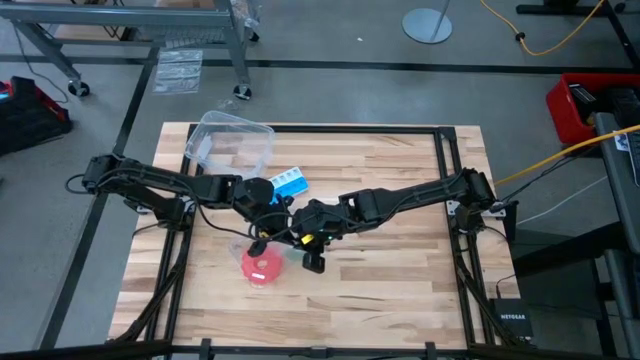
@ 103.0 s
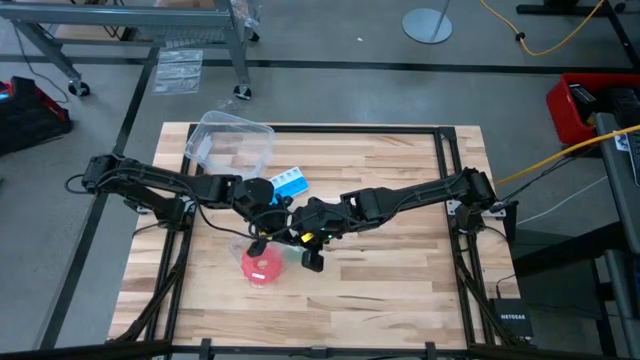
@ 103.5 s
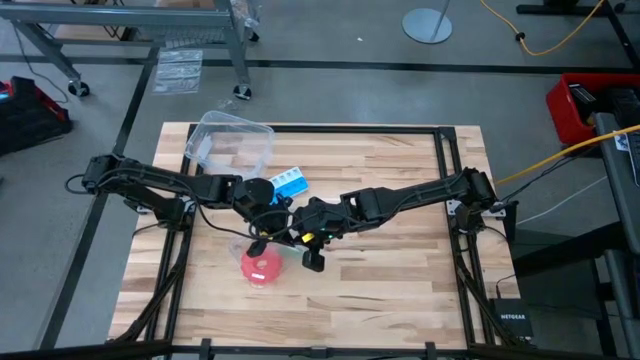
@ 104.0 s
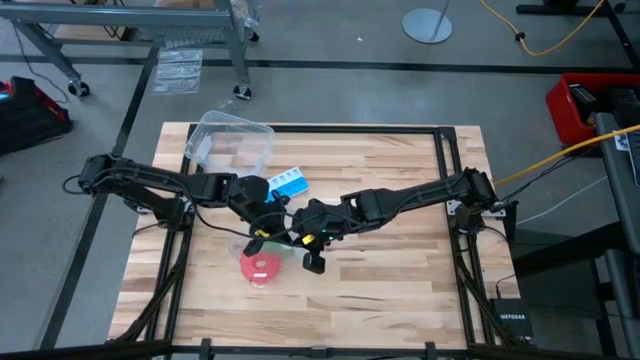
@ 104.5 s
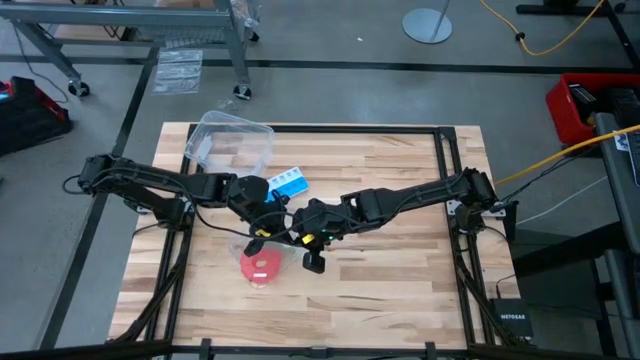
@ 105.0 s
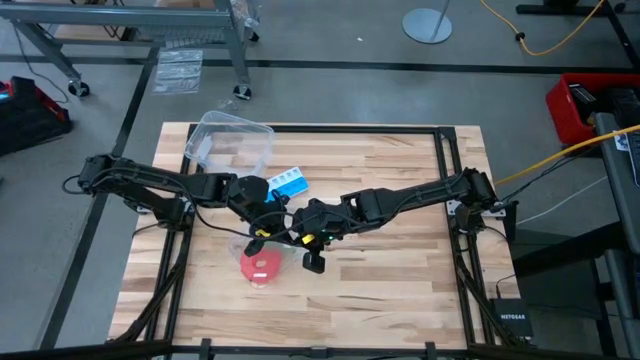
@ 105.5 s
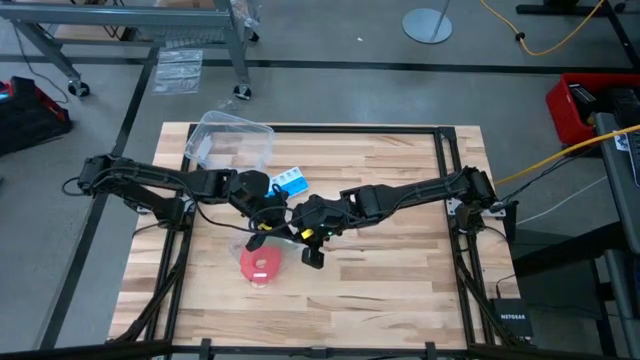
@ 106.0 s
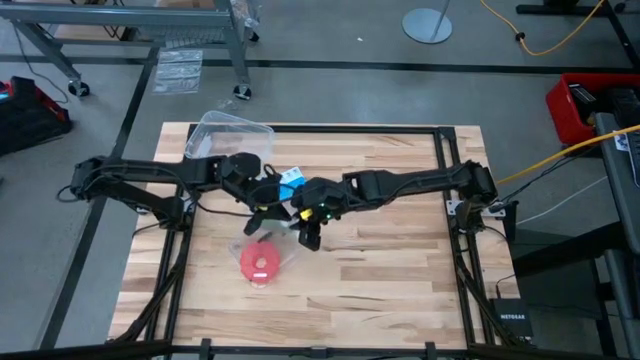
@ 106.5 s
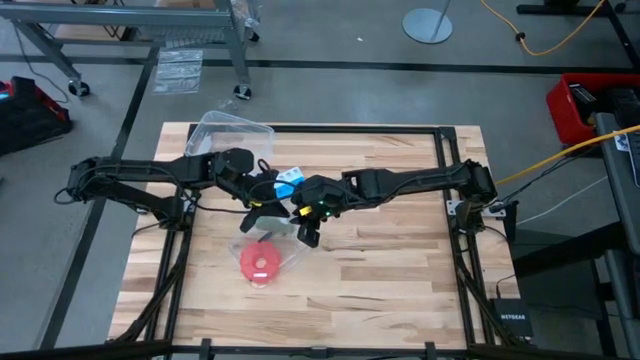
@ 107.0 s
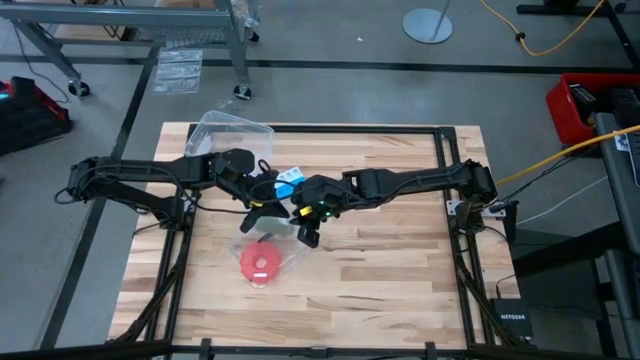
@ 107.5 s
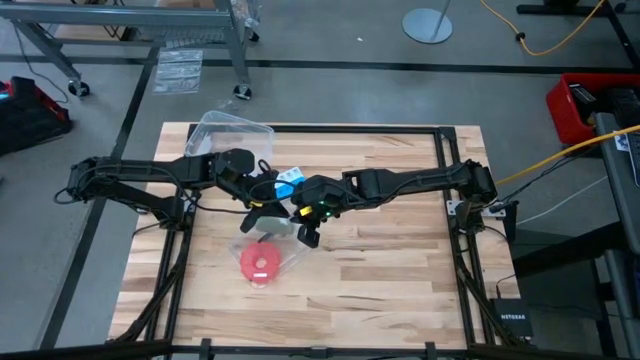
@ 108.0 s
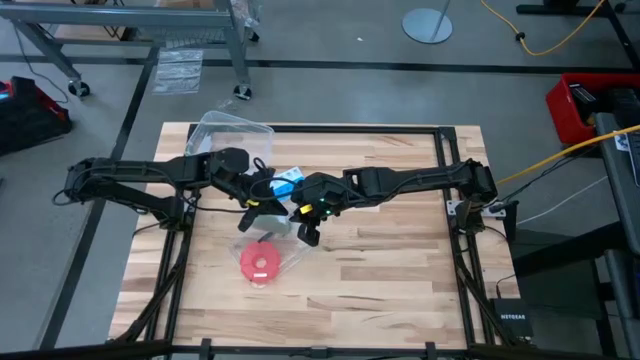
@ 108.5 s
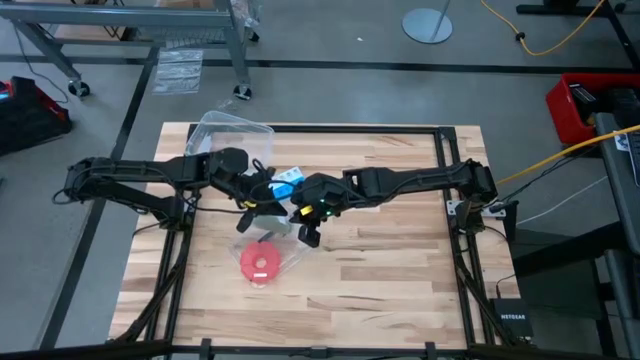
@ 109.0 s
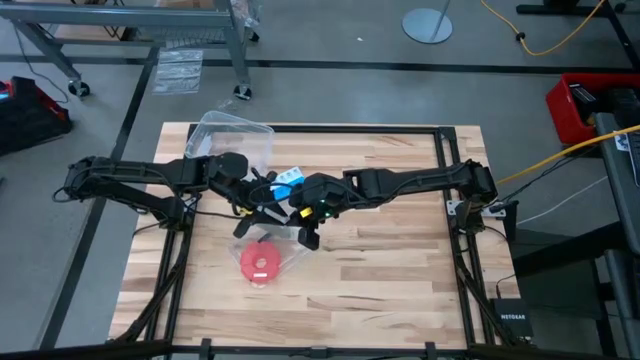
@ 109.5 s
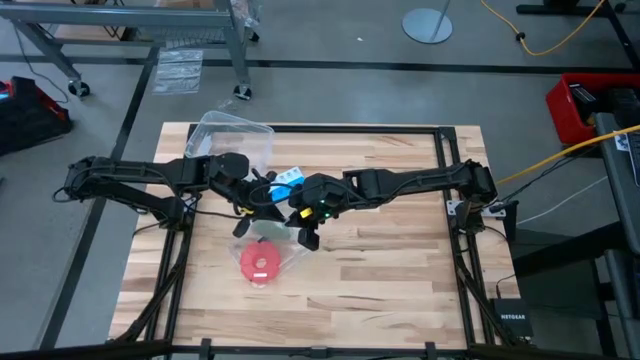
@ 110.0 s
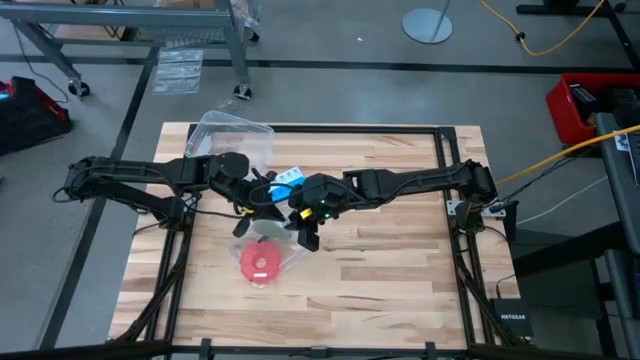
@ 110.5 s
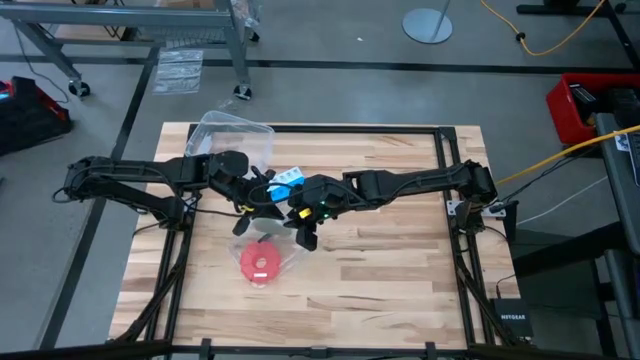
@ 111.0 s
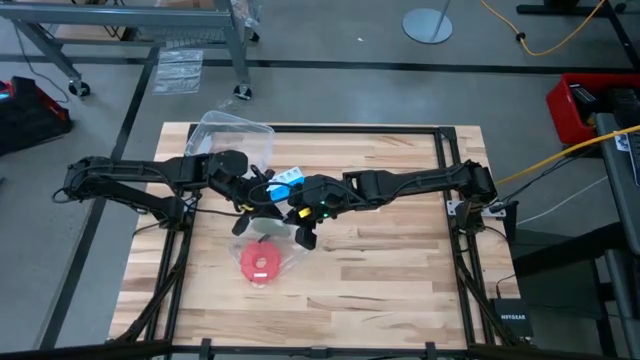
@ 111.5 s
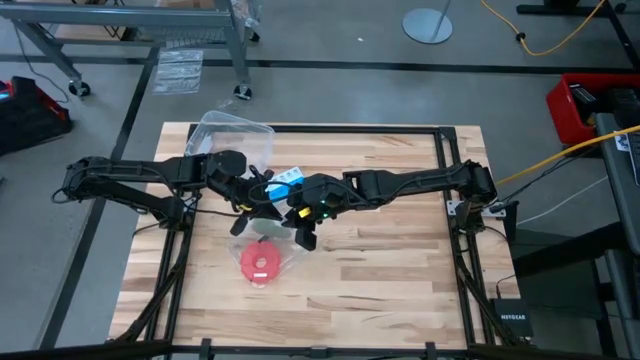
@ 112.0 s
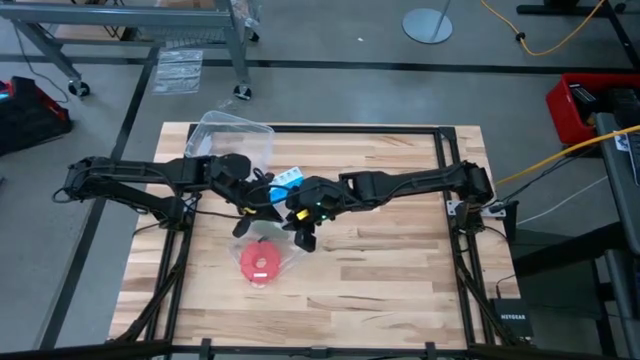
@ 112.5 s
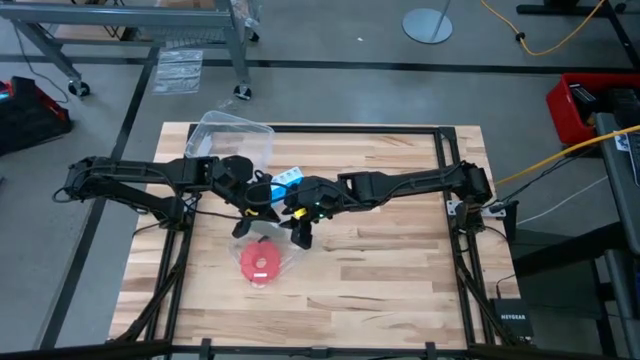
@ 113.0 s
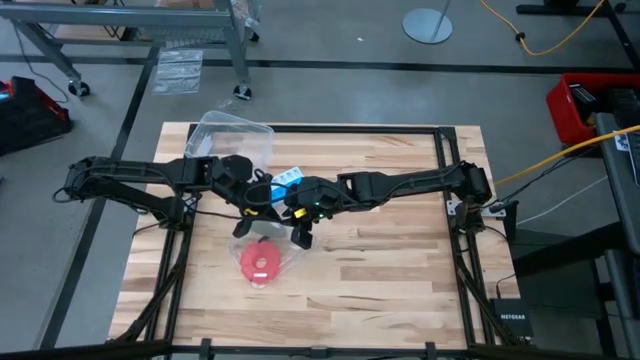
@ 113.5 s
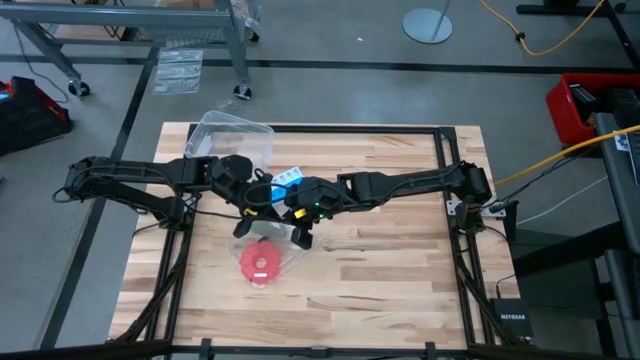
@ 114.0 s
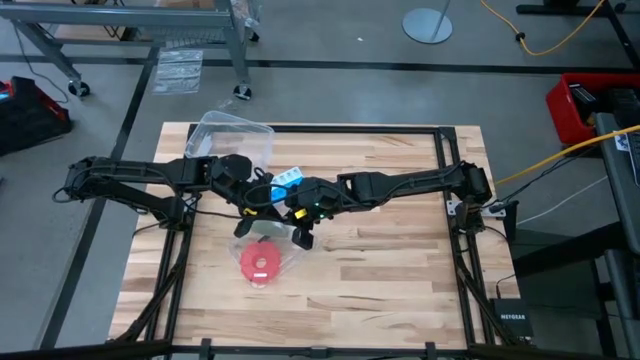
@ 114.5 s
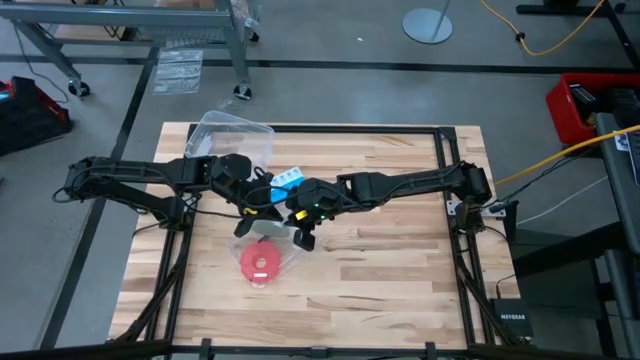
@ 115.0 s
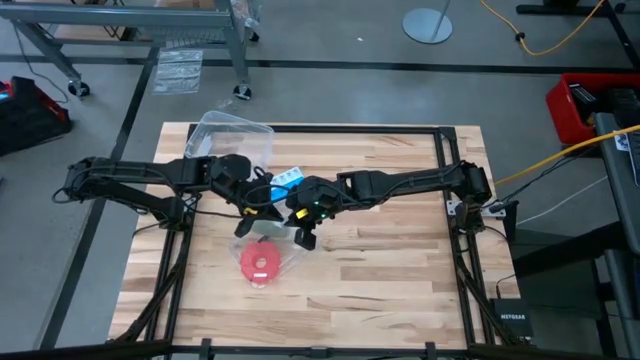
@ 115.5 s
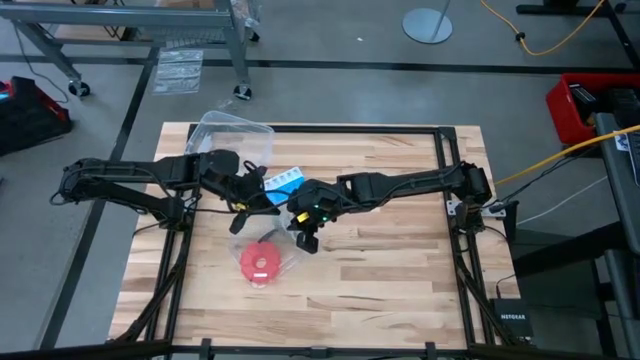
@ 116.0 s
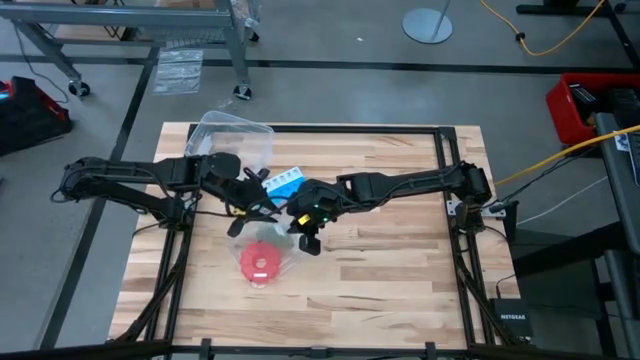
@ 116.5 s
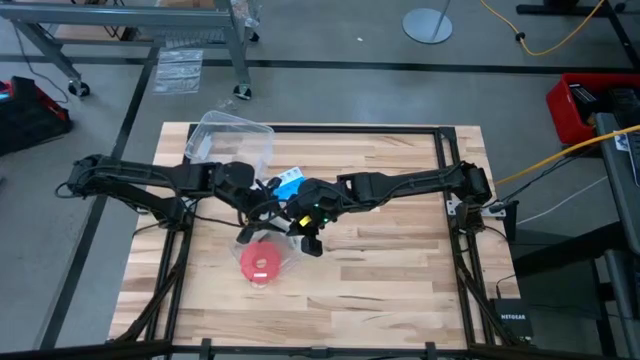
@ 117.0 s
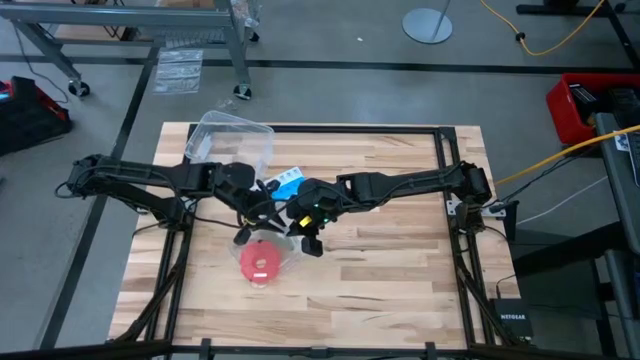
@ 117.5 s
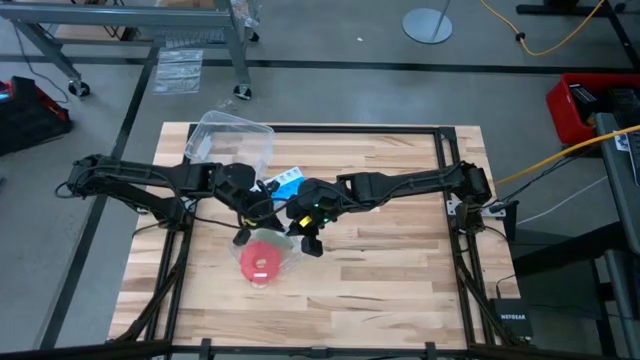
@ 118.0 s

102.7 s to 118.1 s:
Task: Roll bandage
Close the transparent zip bag

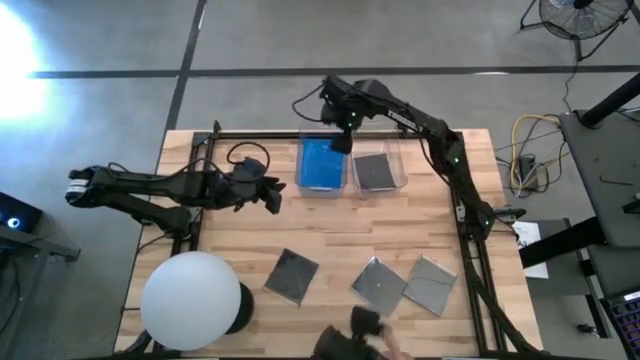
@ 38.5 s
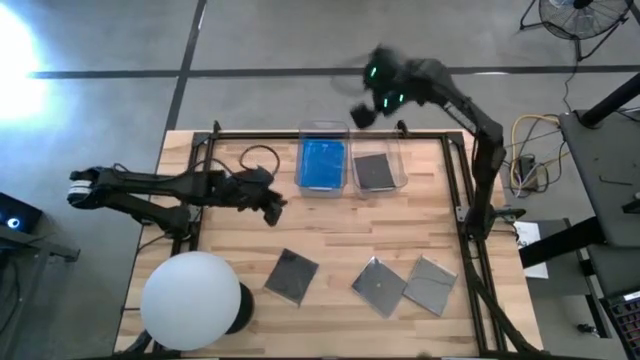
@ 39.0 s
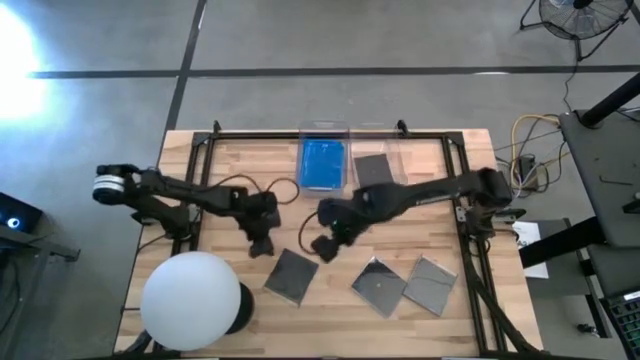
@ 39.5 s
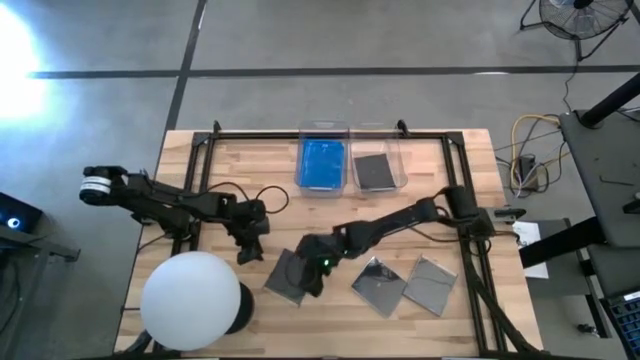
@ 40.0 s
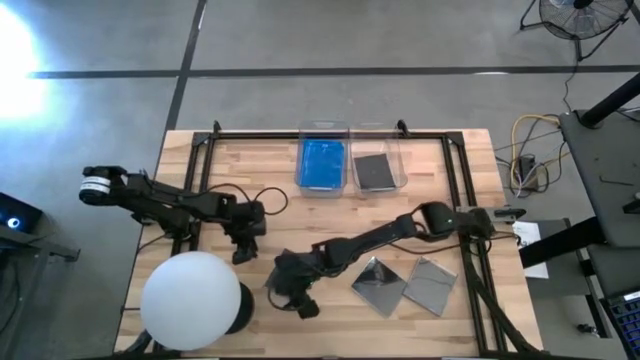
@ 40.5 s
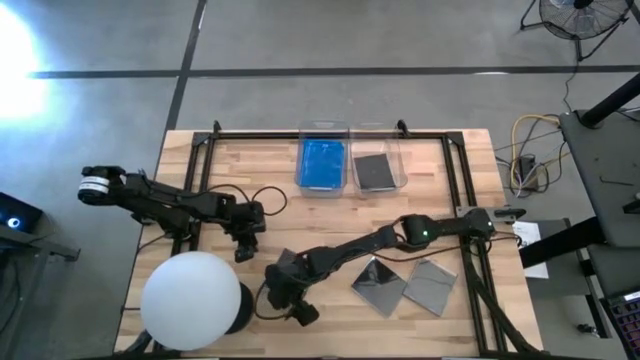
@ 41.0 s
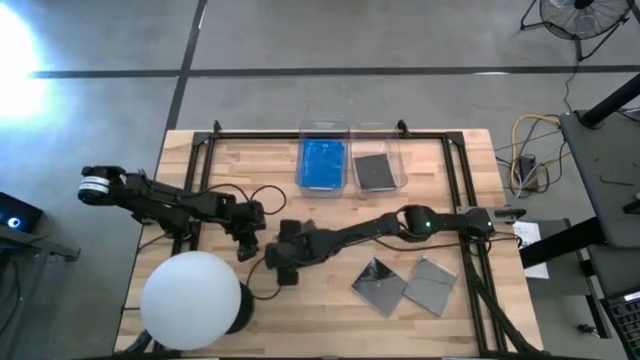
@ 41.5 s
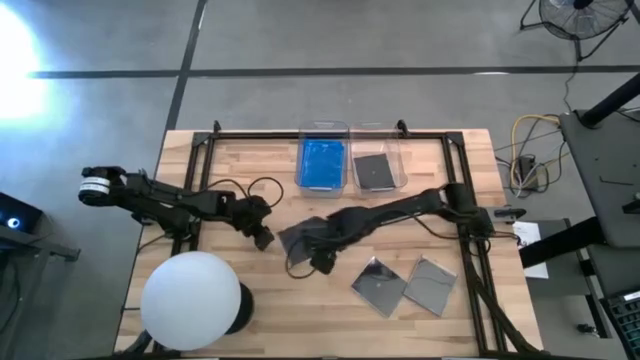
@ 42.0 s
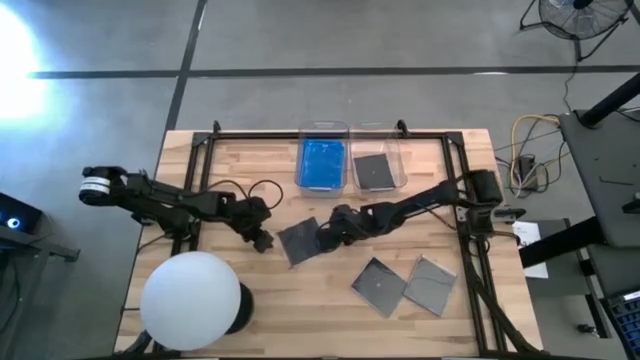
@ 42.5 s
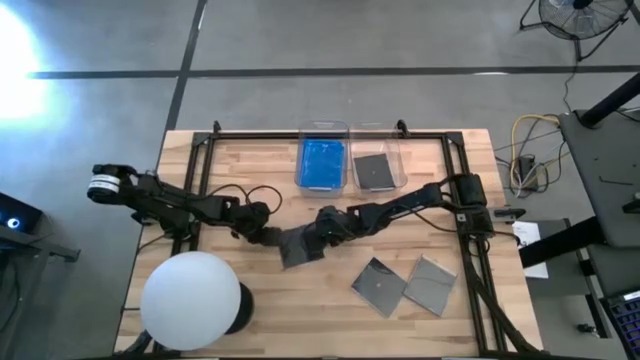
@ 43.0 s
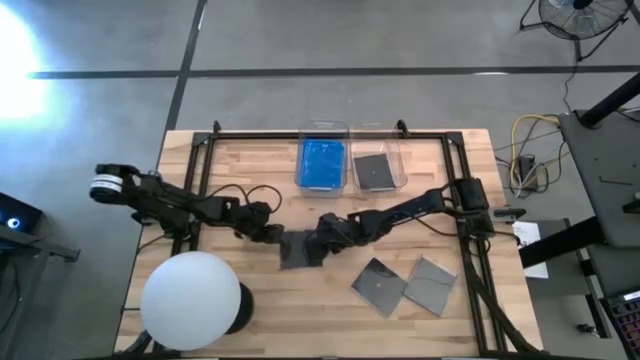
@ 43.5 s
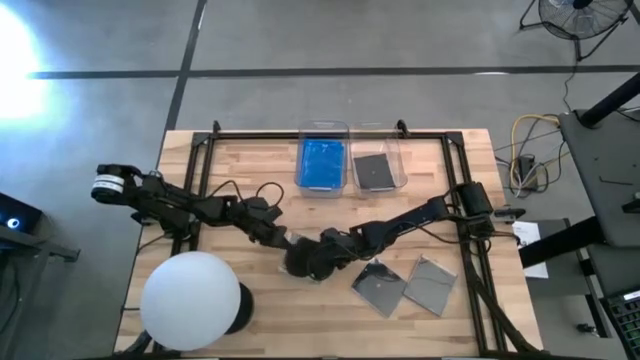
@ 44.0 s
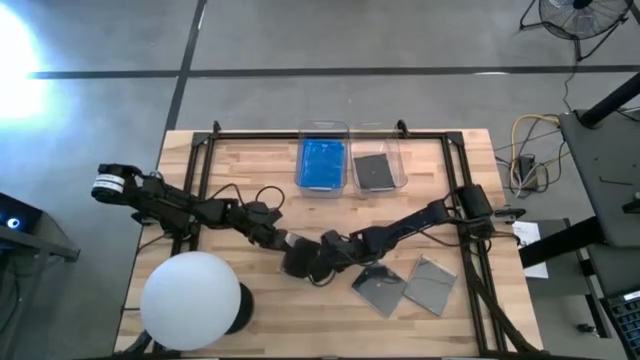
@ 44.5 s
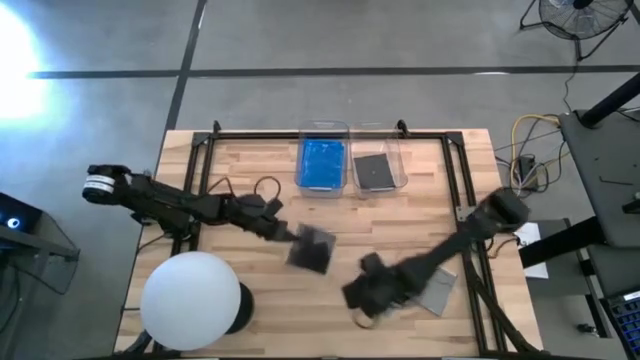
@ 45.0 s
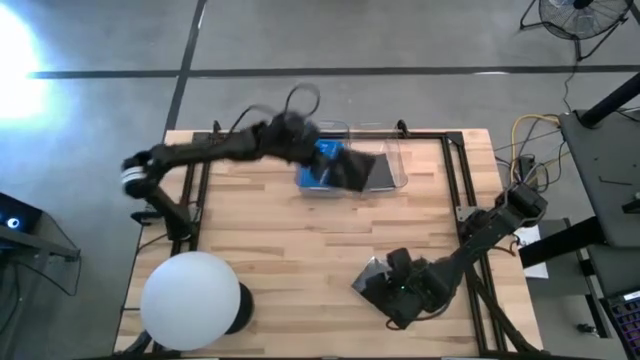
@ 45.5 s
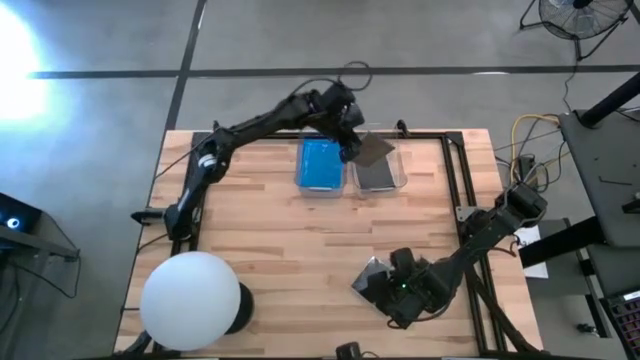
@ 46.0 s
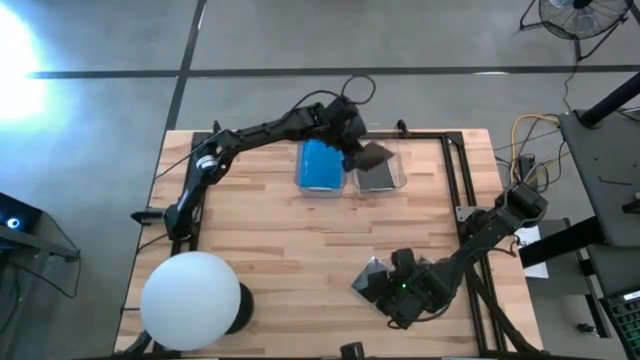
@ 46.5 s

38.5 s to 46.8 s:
Task: Pick & place jewel cases by type
Put the black CD case into the right transparent bin
